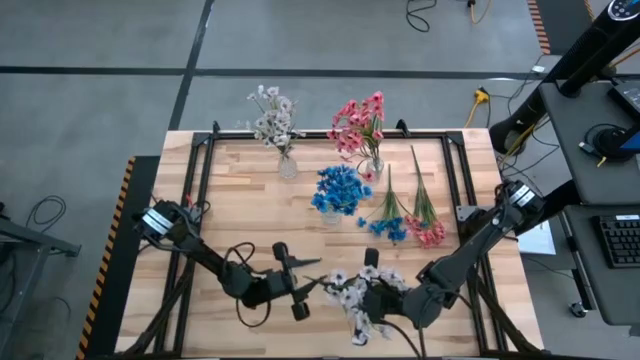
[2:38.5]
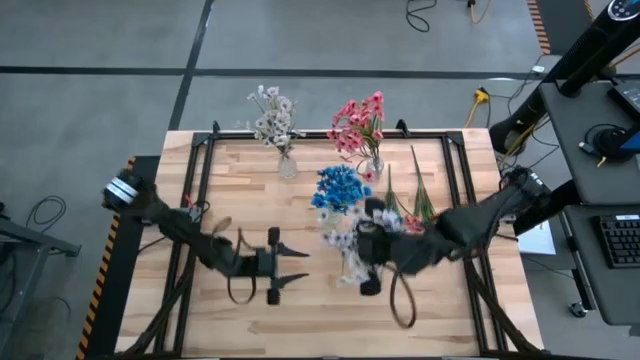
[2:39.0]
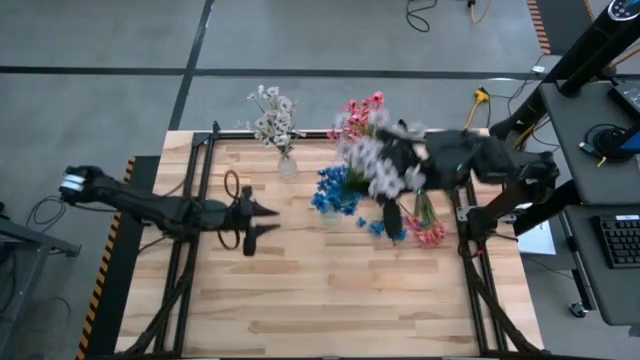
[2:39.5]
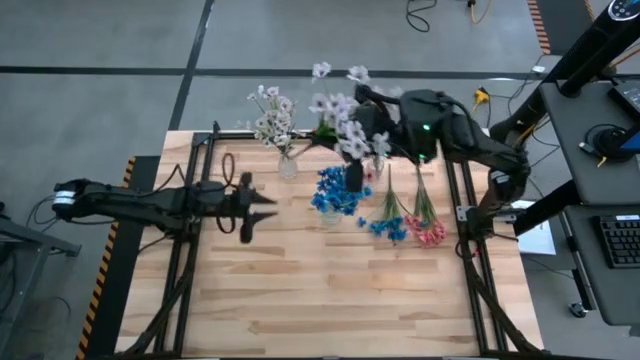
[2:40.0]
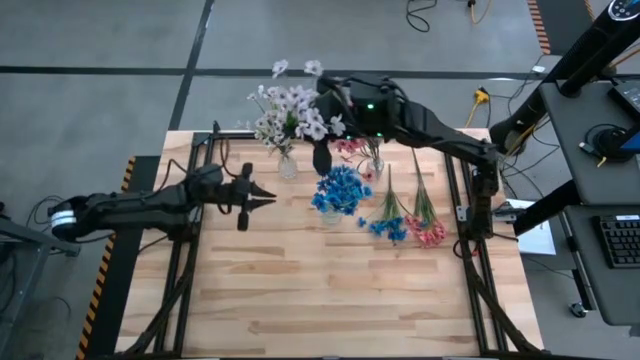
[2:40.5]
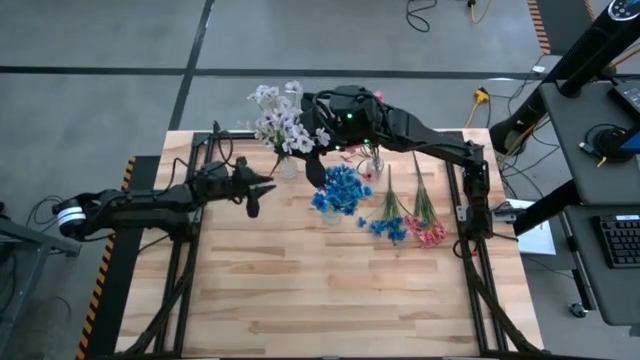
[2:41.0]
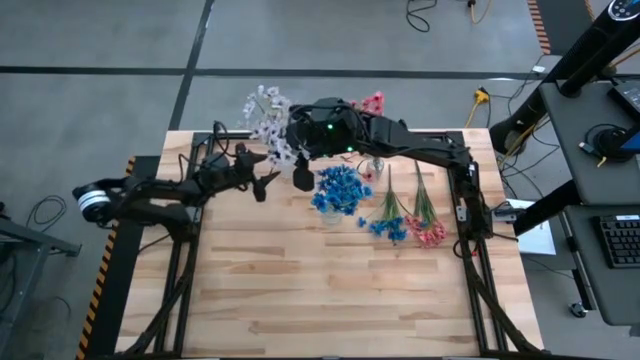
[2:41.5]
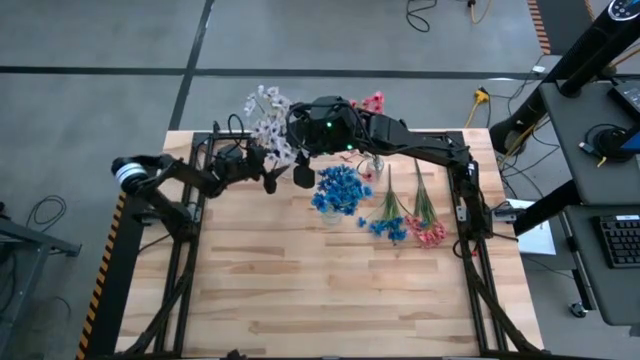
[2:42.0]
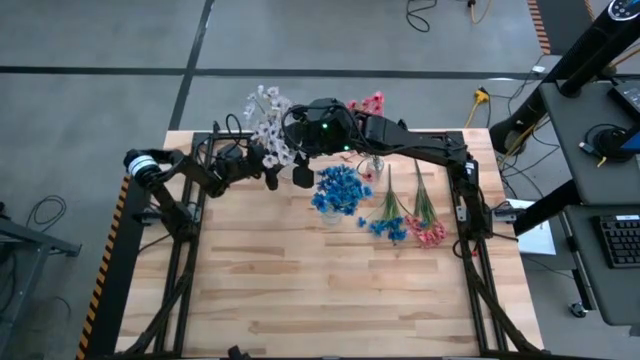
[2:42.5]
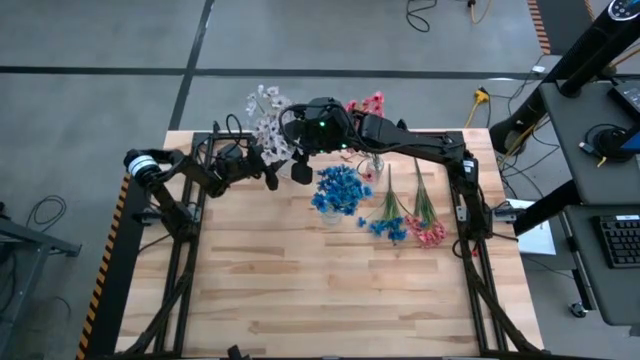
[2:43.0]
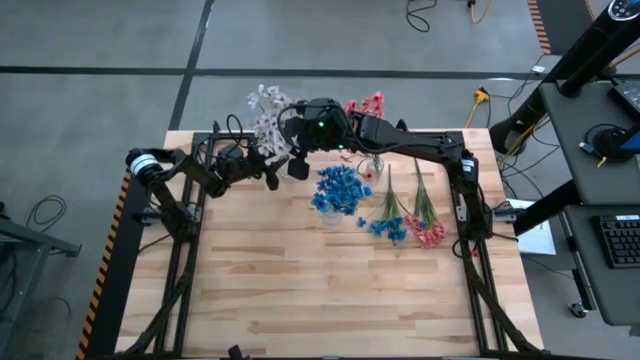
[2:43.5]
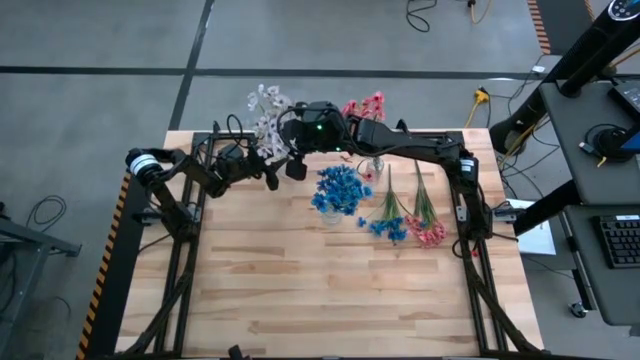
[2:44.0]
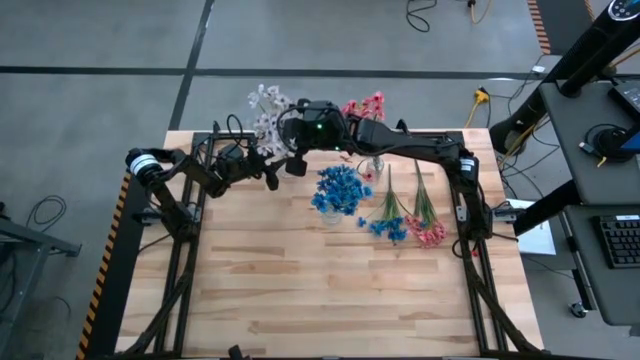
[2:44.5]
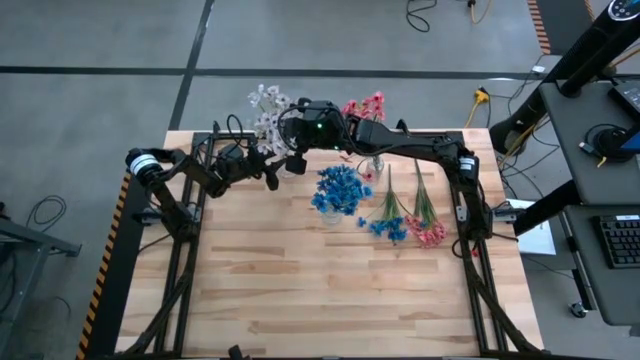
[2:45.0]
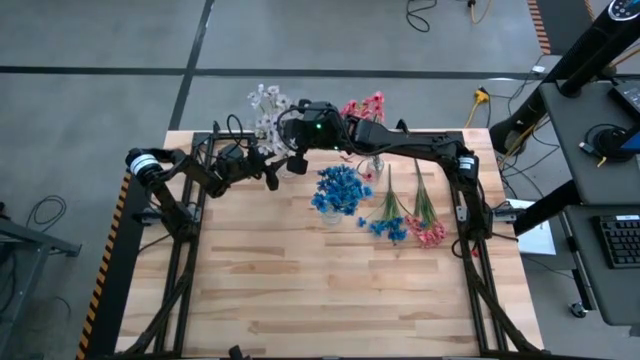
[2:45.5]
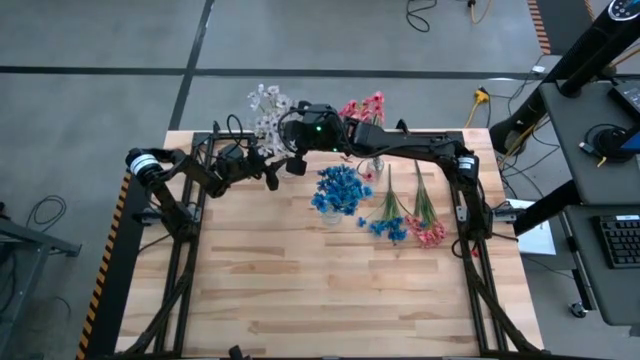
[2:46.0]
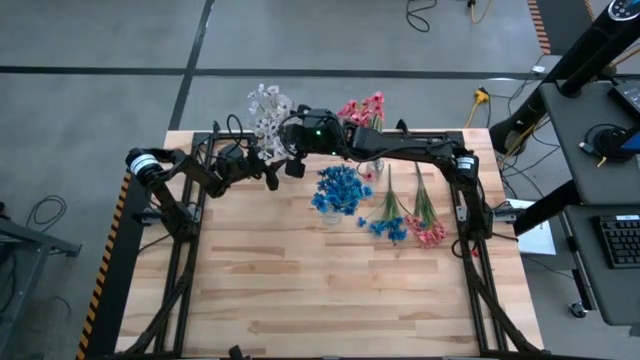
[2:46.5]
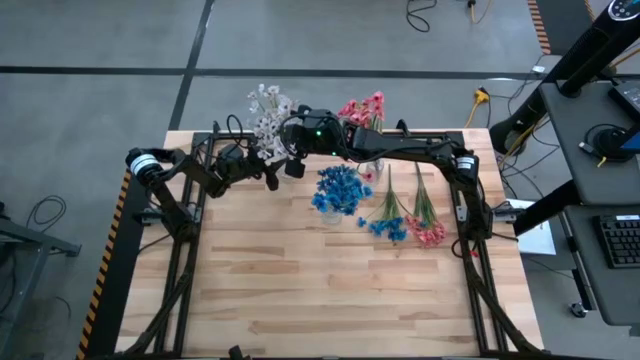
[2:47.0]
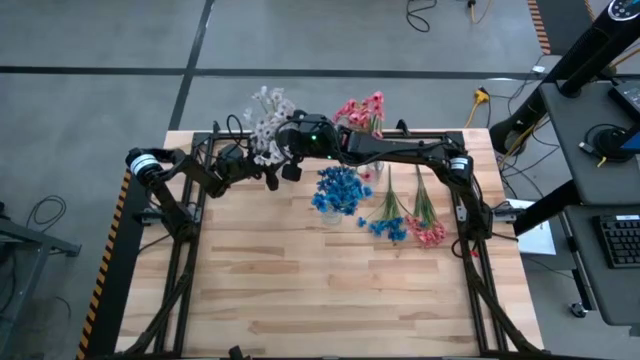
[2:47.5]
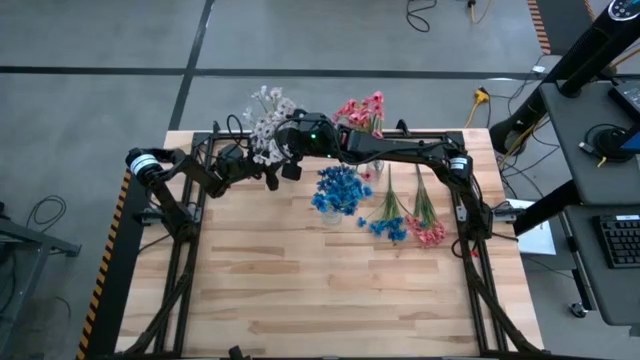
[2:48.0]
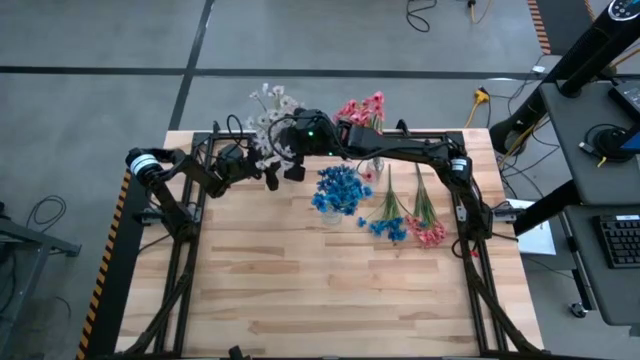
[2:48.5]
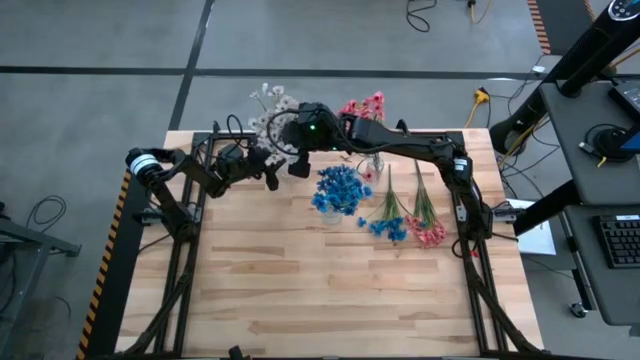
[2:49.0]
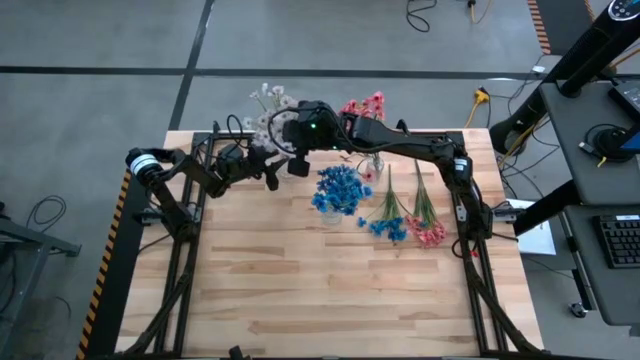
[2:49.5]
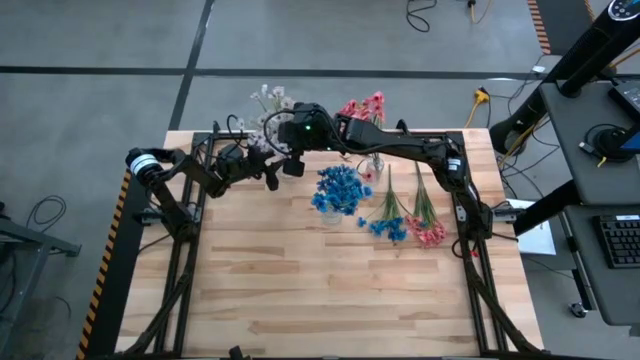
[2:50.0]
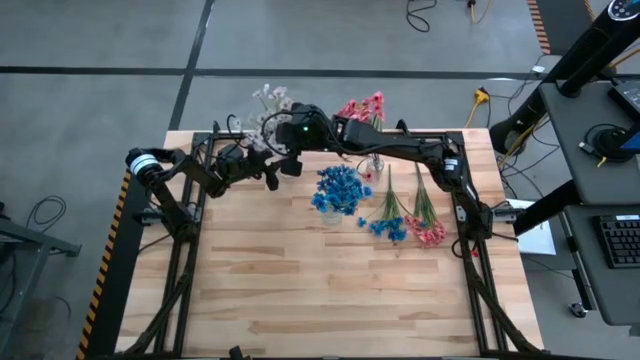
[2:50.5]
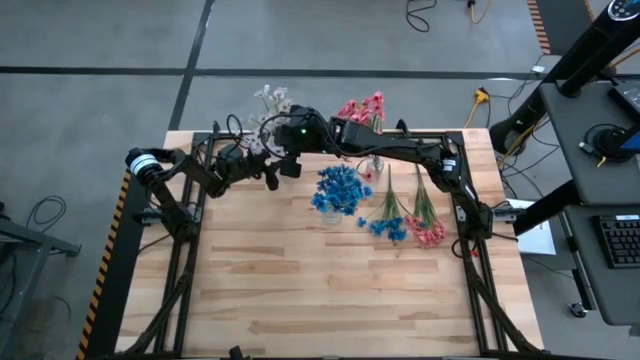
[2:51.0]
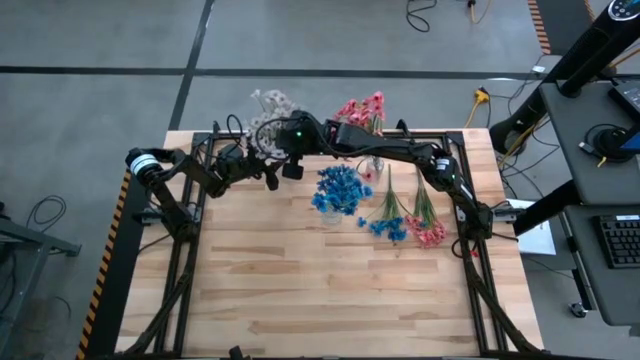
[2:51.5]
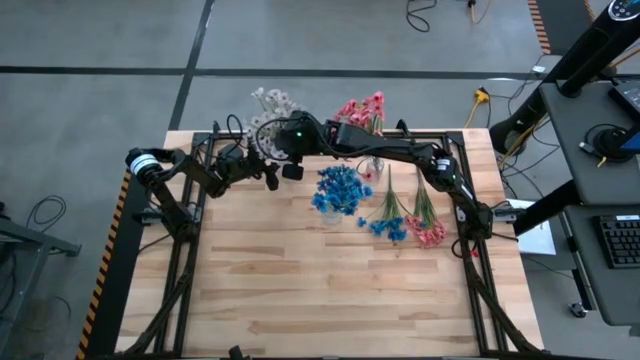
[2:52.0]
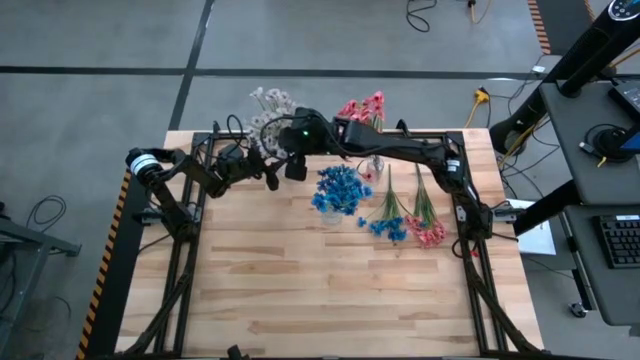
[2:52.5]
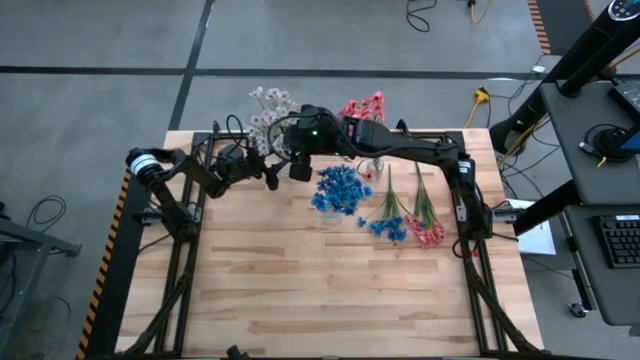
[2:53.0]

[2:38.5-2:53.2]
Task: Sort flowers into vase by color
Put the white flowers into the left transparent vase

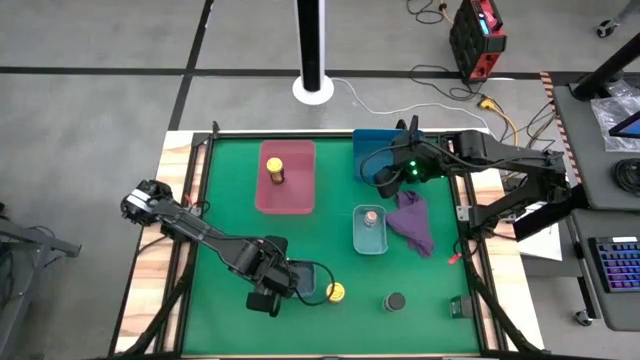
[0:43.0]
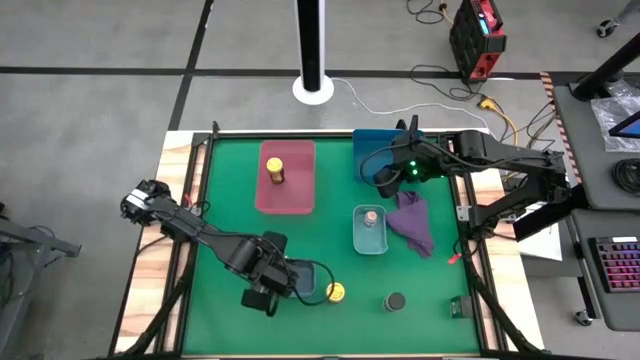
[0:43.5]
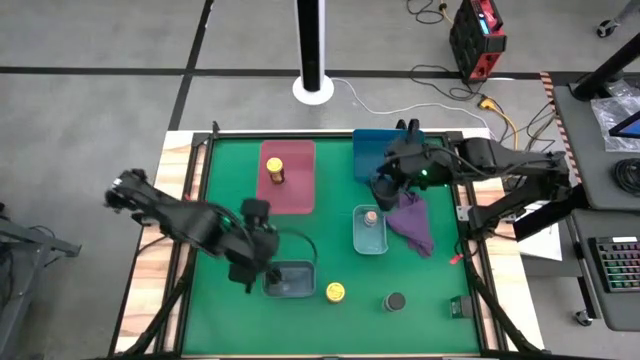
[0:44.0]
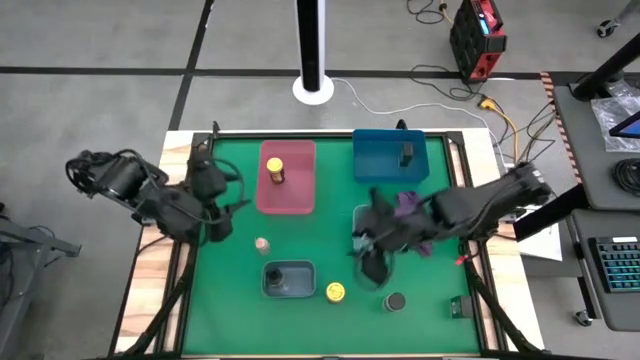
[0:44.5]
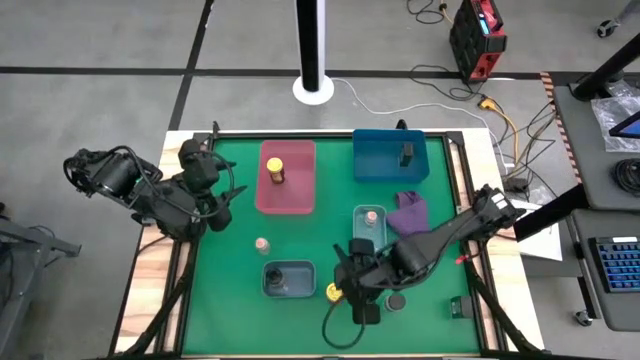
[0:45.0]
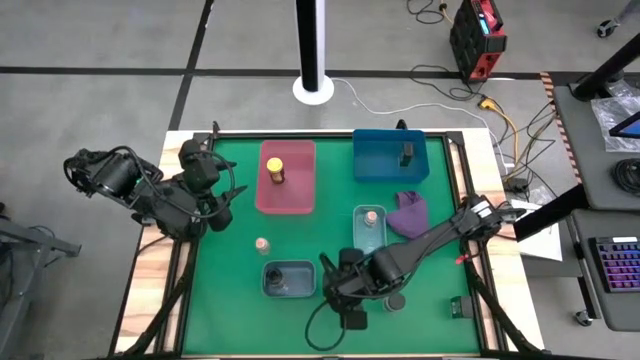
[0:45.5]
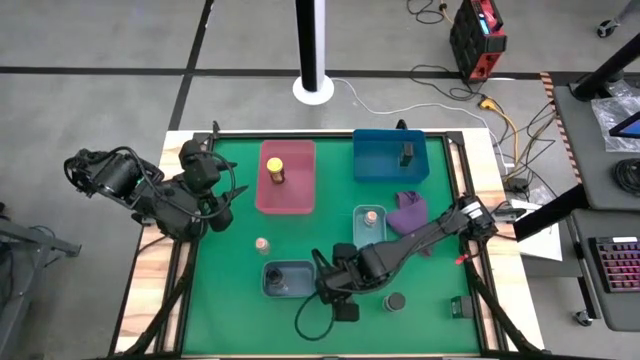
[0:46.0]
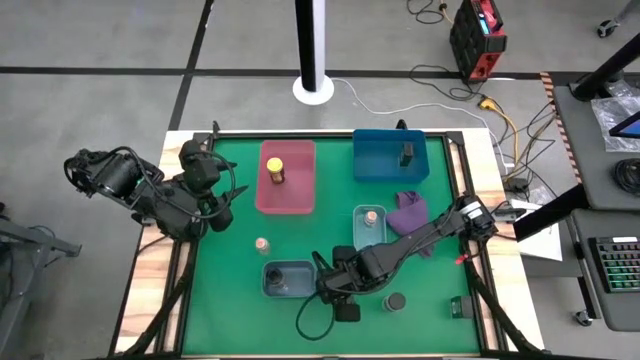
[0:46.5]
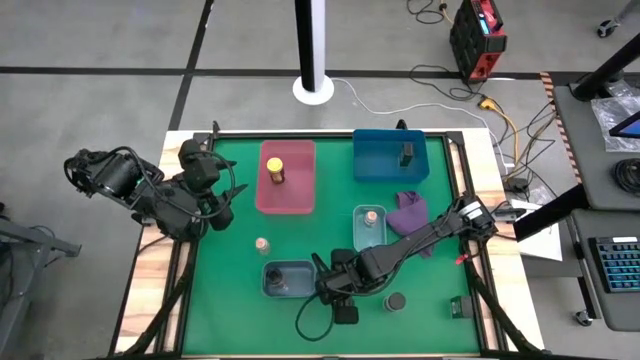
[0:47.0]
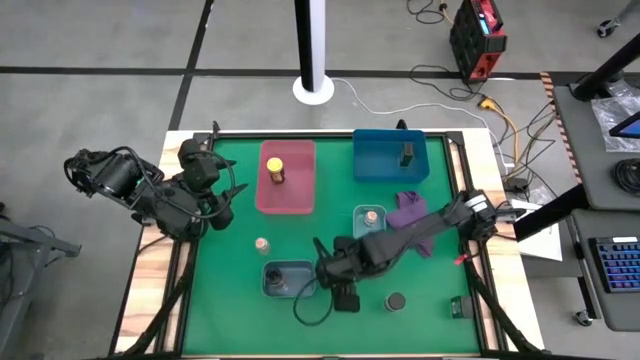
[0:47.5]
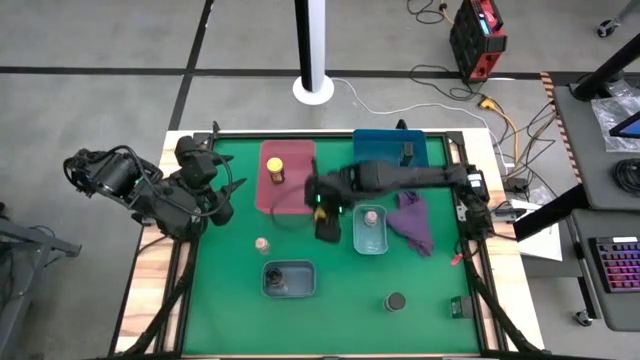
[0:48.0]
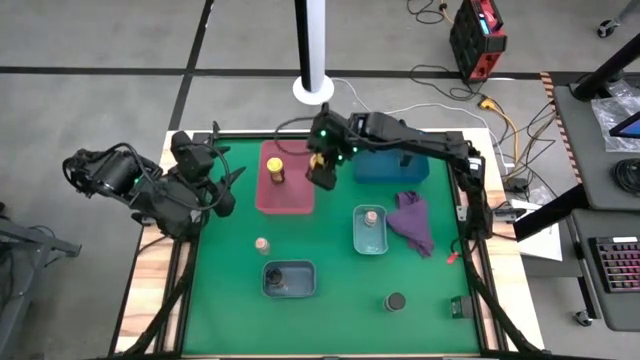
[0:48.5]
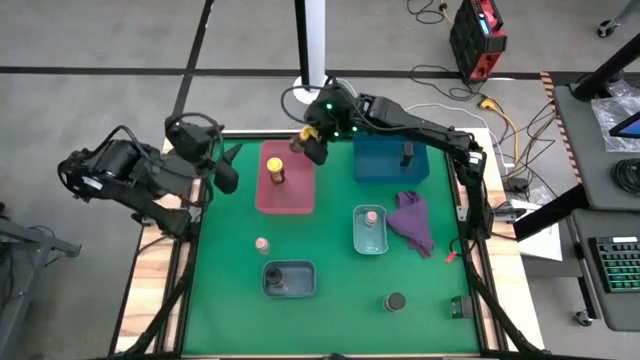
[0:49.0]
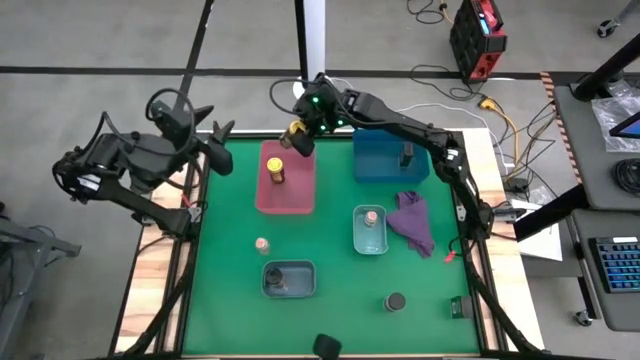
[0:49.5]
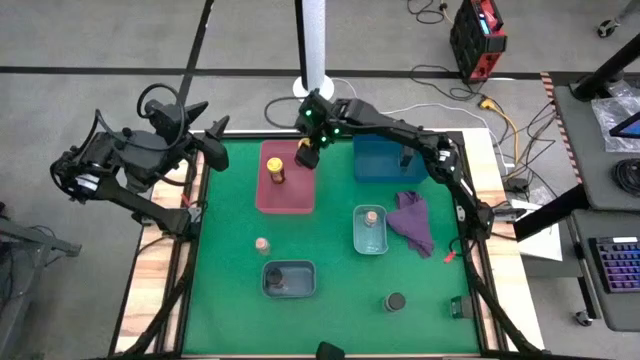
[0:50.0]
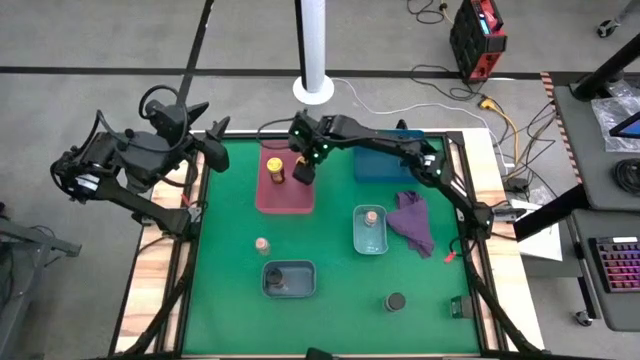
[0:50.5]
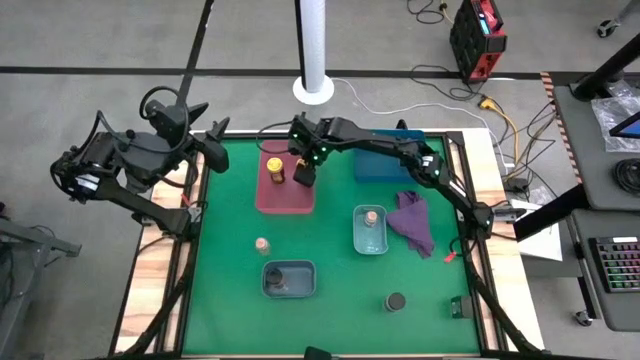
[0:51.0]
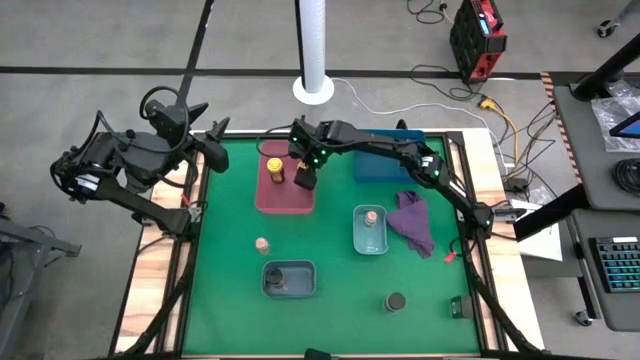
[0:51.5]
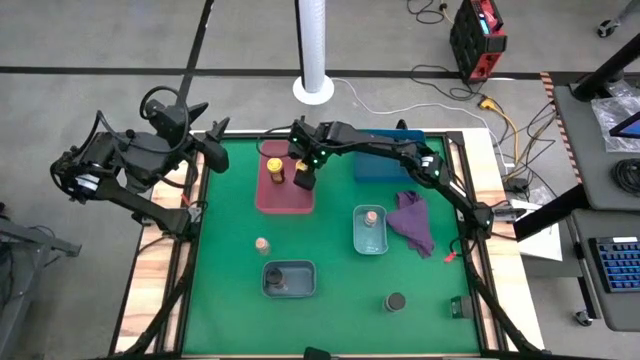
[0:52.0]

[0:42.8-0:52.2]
Task: Sort spices by type
Put the yellow seasoning bottle into the large pink bin
